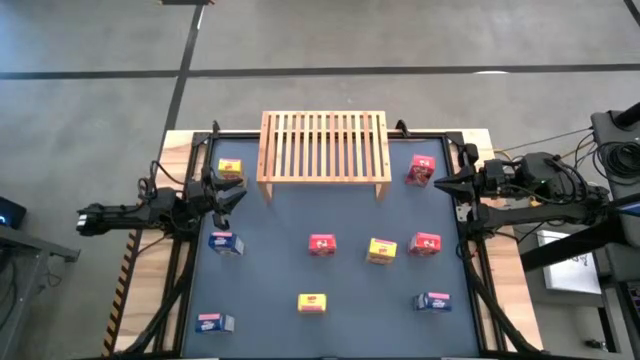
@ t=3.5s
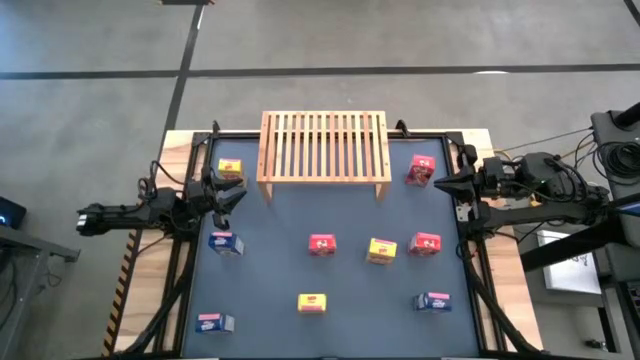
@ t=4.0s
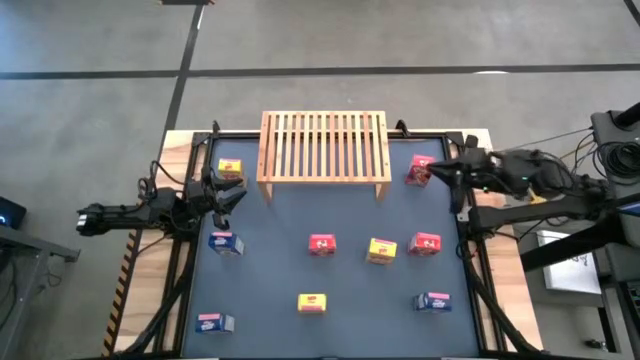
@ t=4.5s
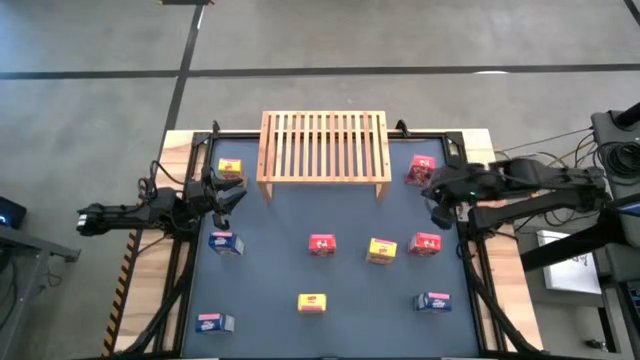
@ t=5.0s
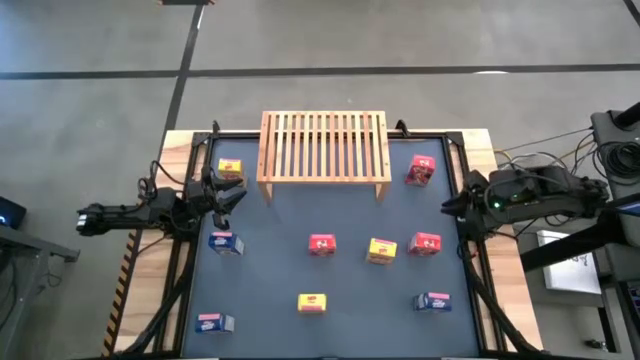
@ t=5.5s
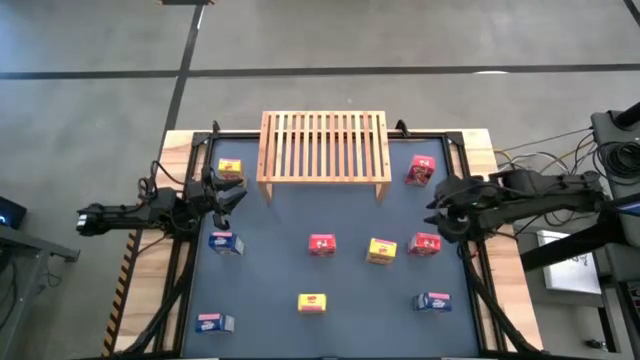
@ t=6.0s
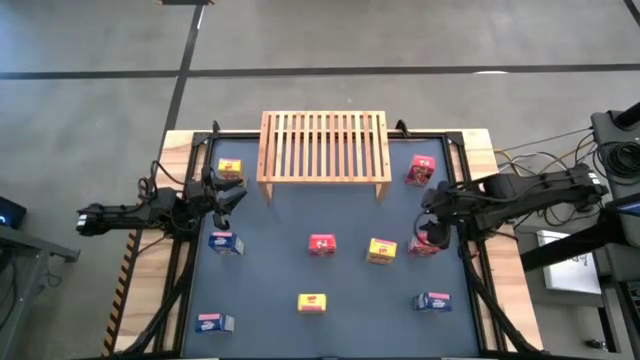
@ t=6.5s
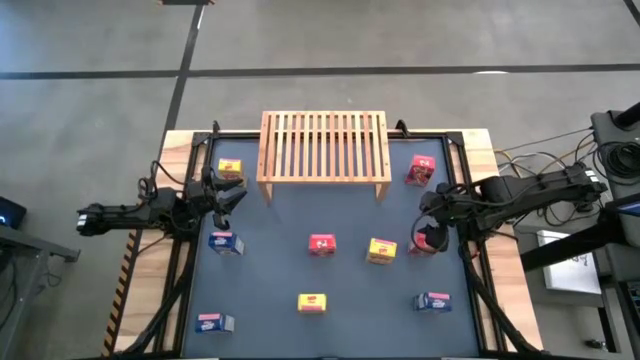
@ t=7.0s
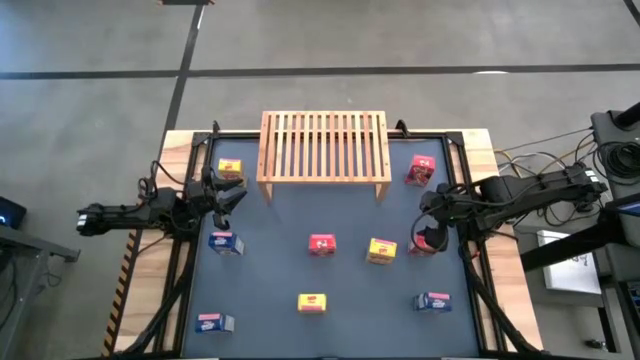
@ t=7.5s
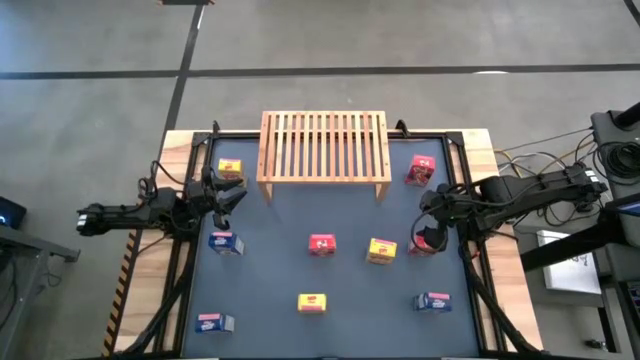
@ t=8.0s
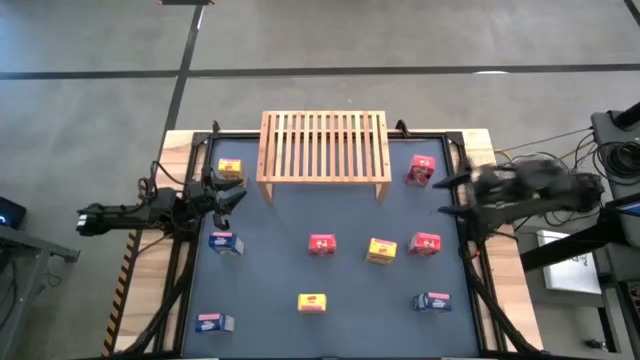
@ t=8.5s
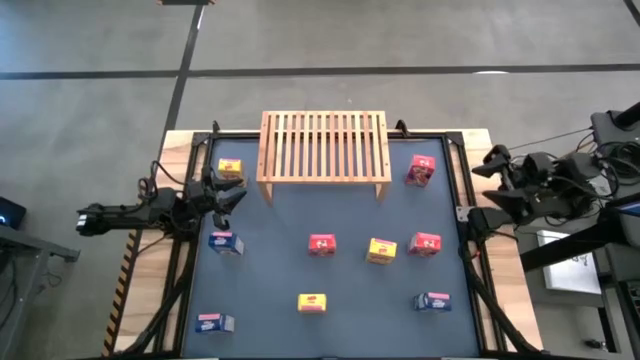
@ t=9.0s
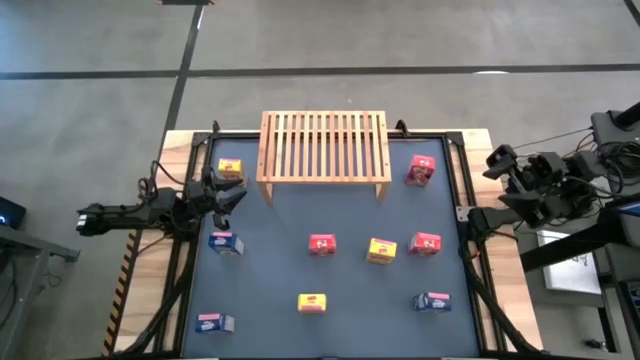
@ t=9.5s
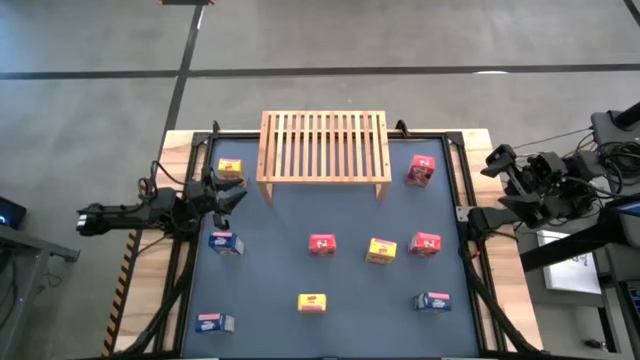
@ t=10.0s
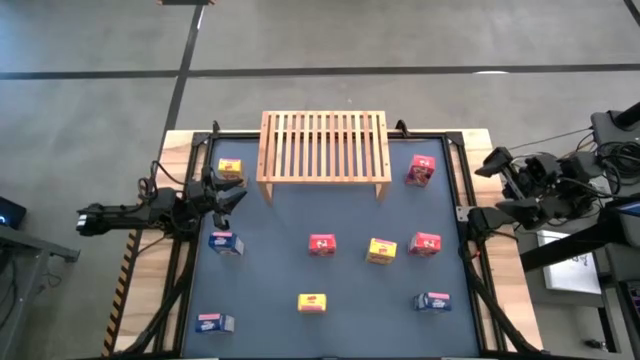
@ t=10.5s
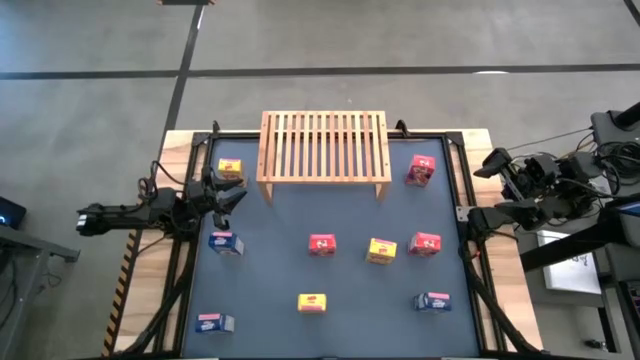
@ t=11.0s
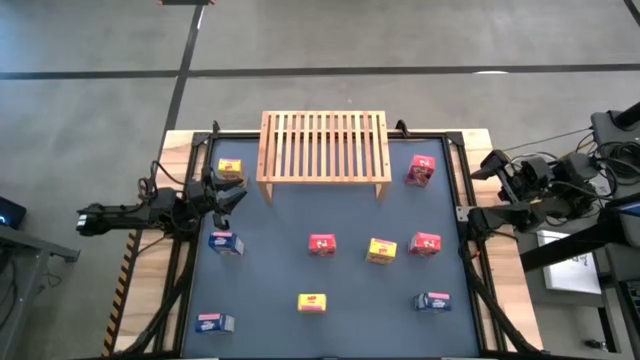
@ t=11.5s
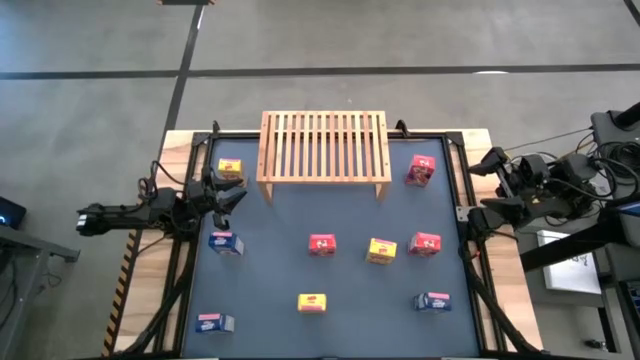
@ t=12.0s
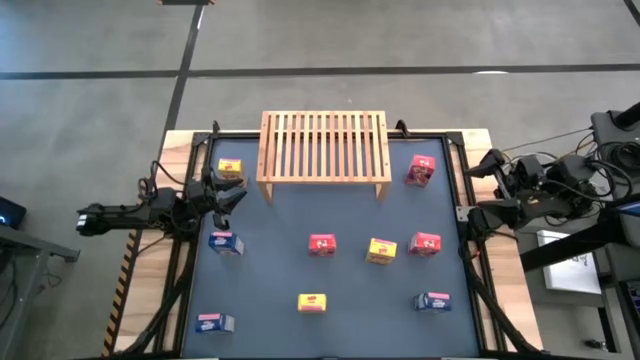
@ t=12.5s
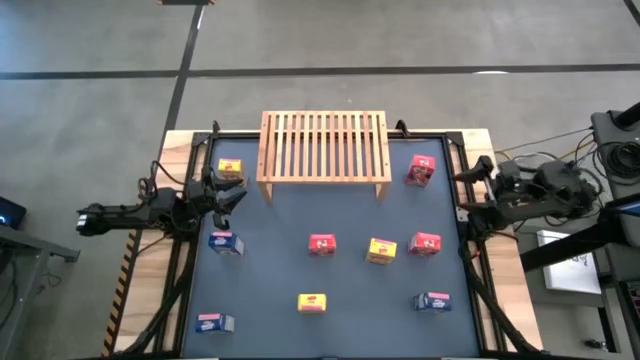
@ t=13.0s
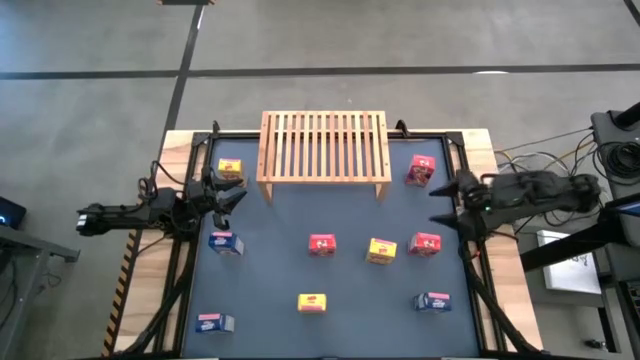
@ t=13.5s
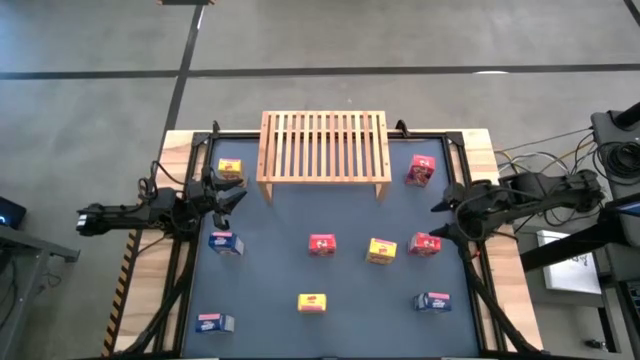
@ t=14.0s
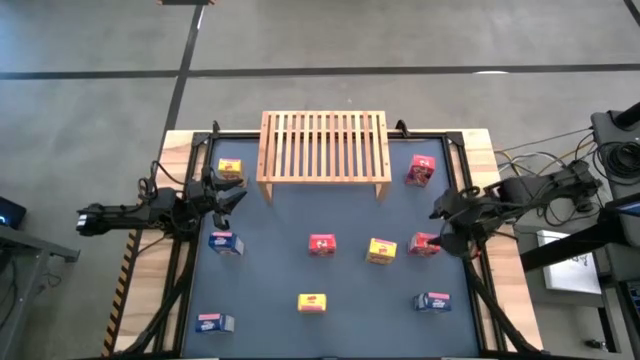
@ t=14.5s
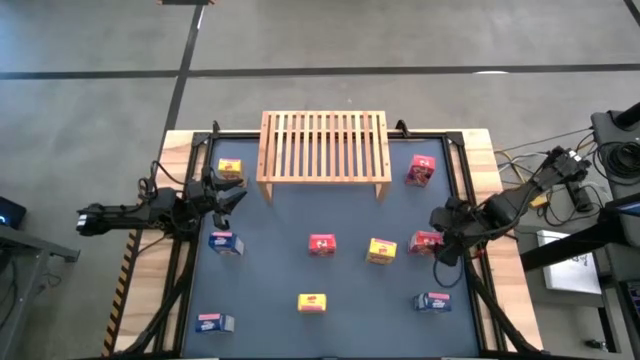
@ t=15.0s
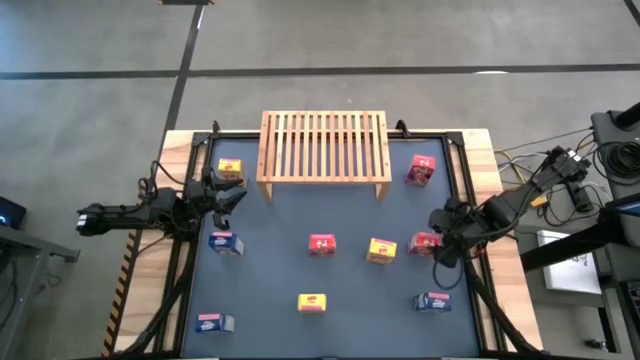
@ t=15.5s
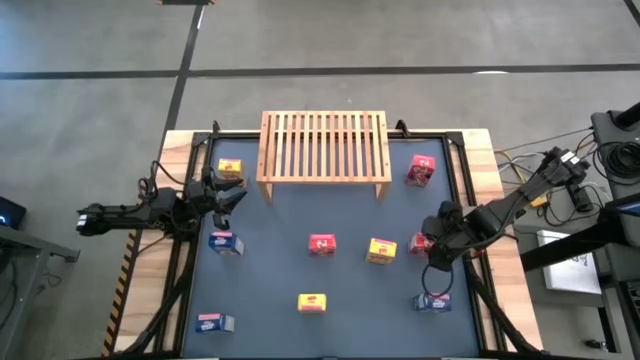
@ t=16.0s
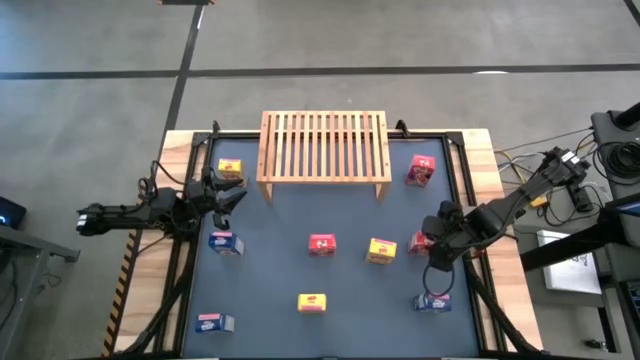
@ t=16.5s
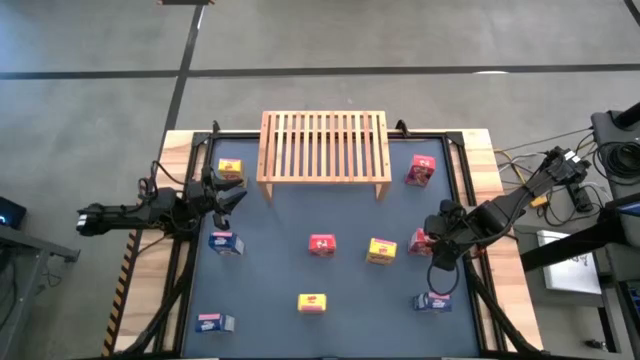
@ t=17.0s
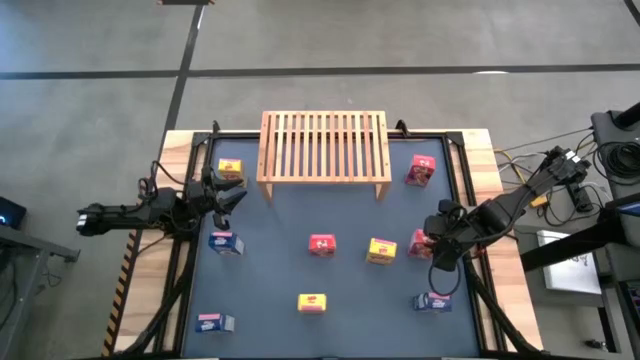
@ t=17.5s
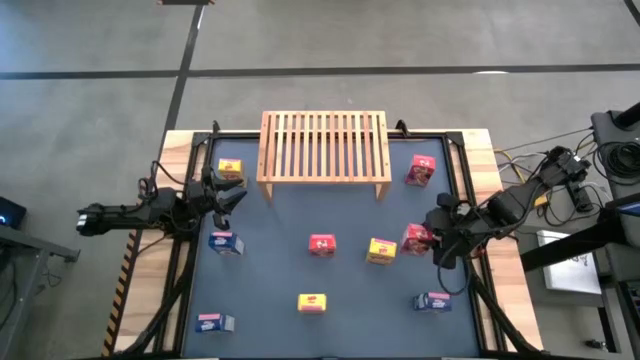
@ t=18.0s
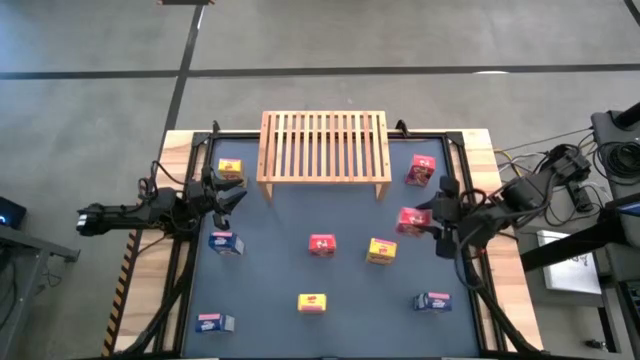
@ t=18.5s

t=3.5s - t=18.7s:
Task: Stack cereal on shelf
Put the bottom right red cereal box on the shelf

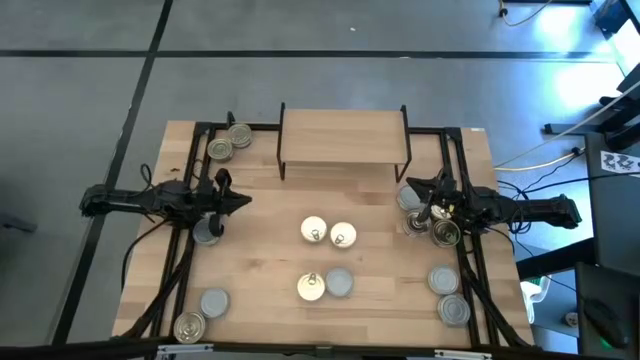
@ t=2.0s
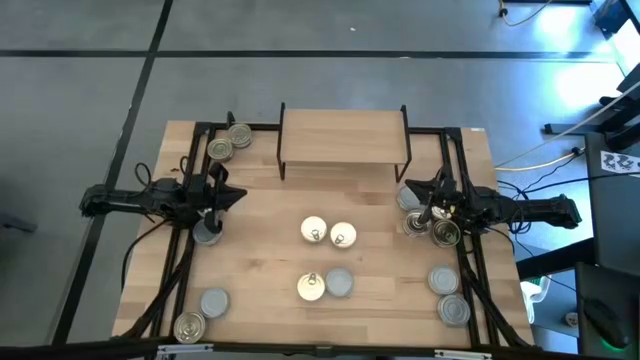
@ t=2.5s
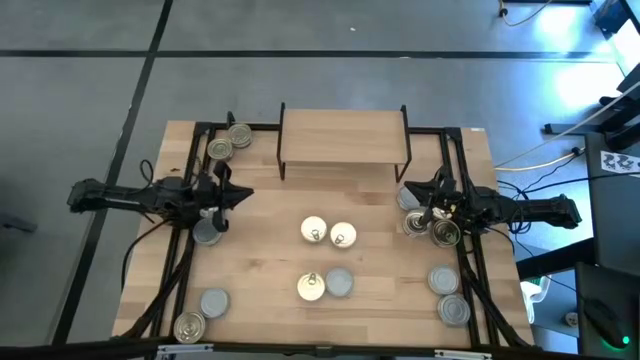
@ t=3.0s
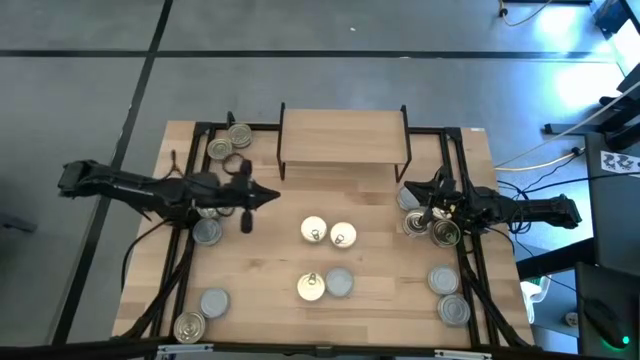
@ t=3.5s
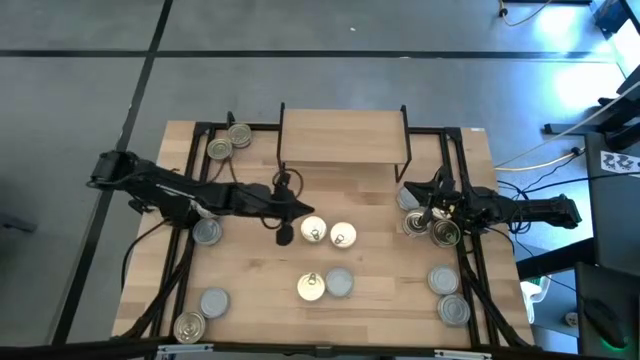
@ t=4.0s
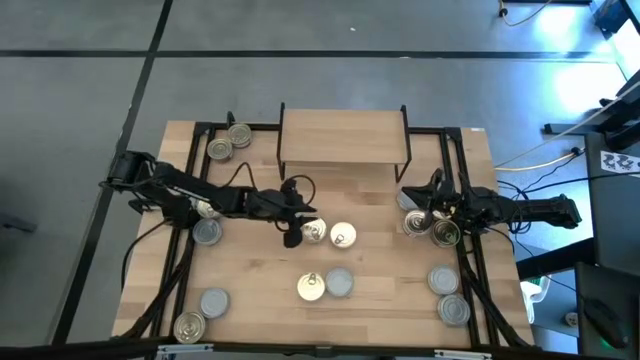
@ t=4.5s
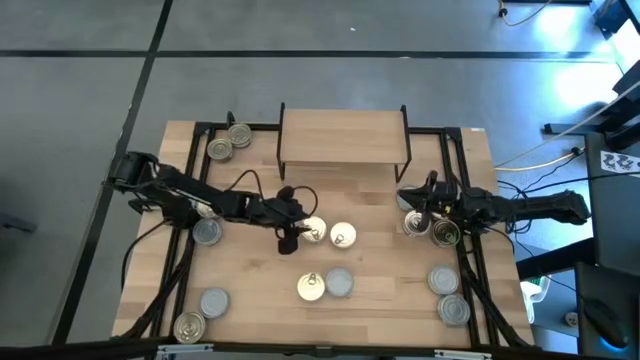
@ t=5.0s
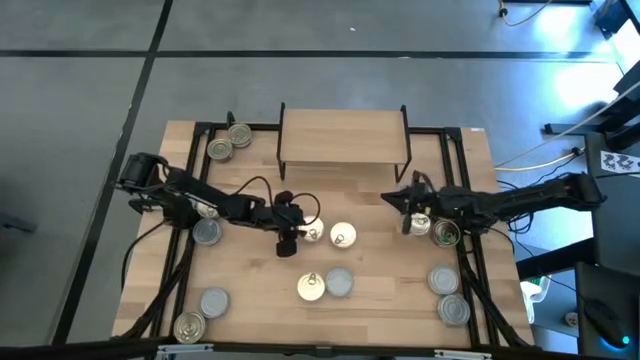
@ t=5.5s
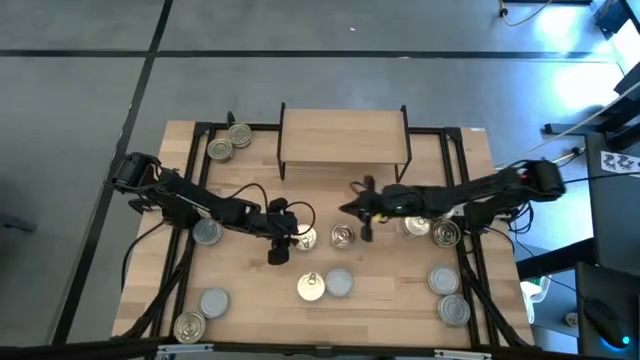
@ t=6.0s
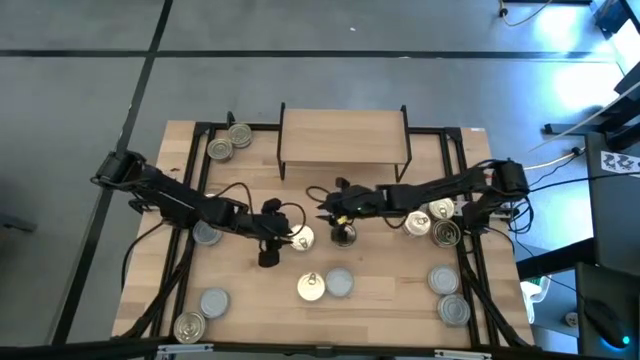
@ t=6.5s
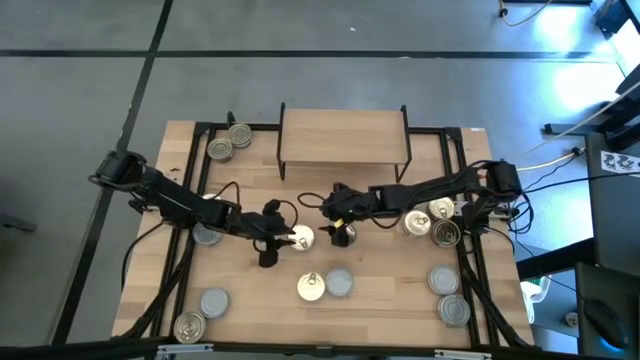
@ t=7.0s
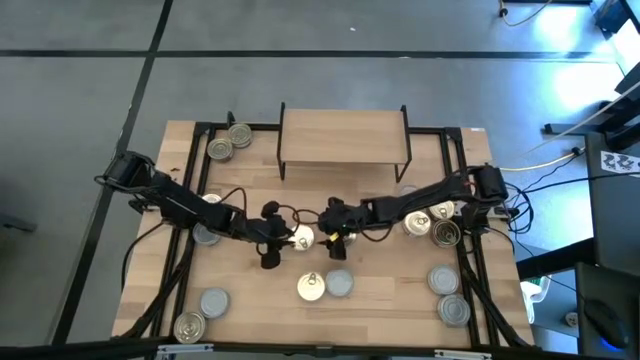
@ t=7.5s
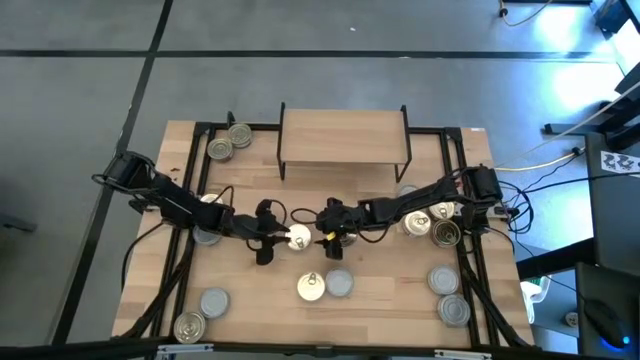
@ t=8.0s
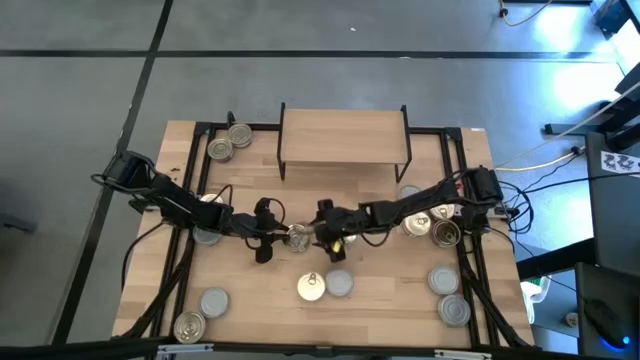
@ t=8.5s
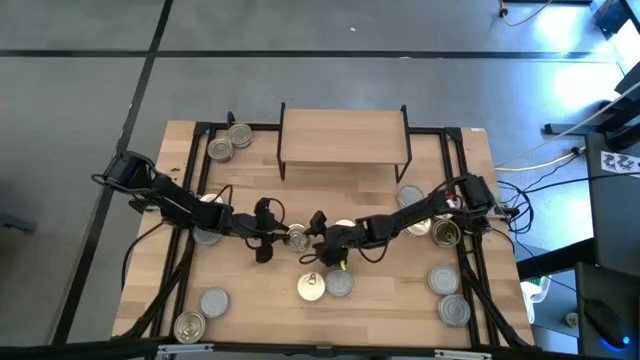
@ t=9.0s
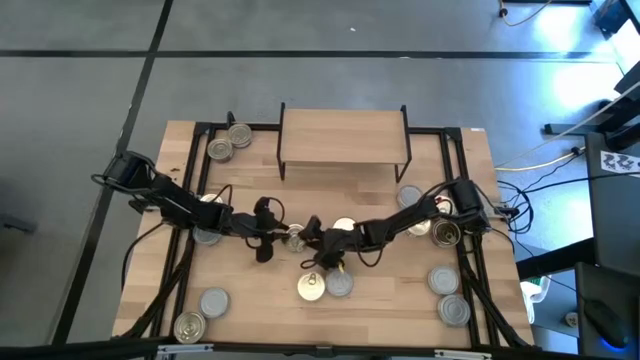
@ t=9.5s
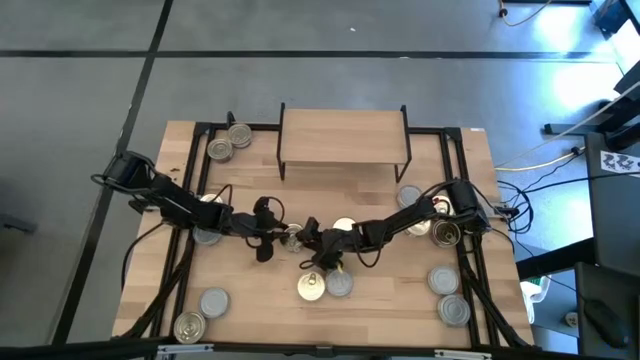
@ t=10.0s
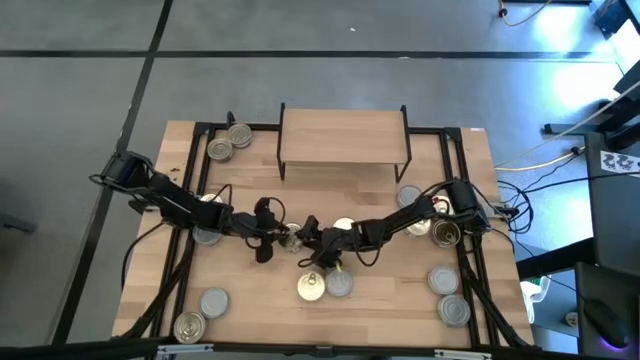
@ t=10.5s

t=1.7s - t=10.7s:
Task: Stack canned seafood by type on shelf
Put the blue tuna can on the shelf
